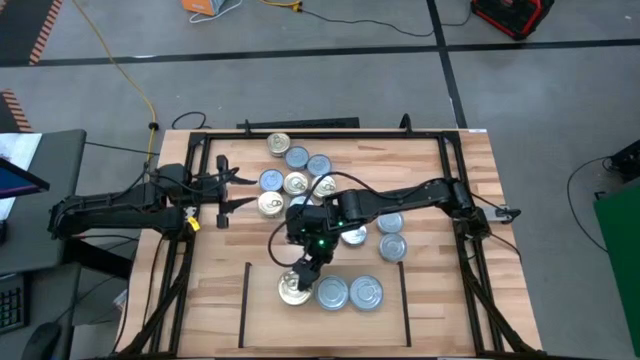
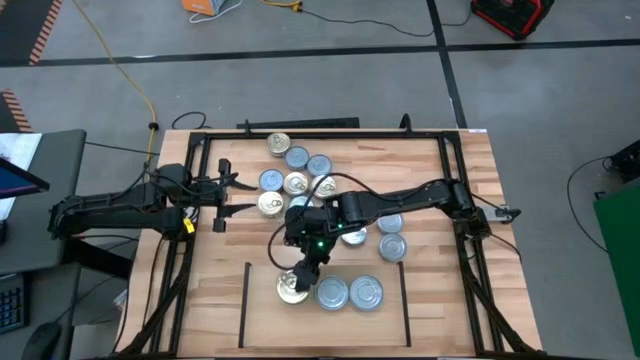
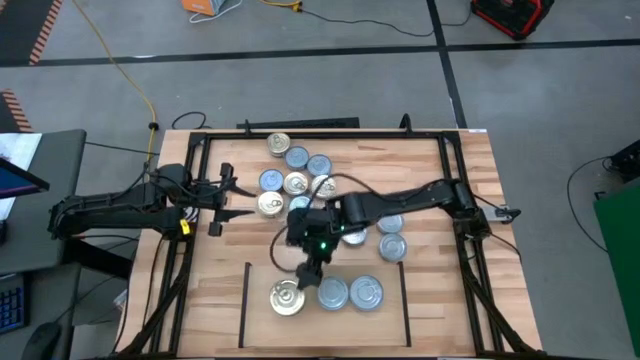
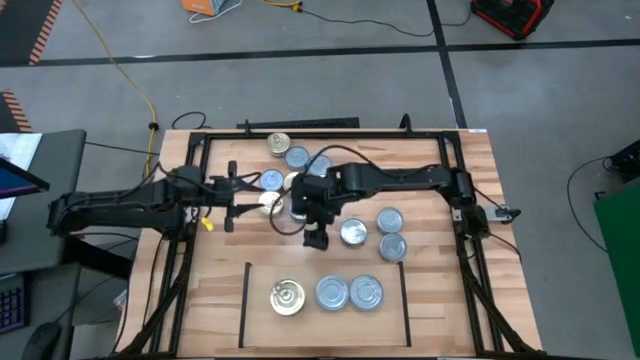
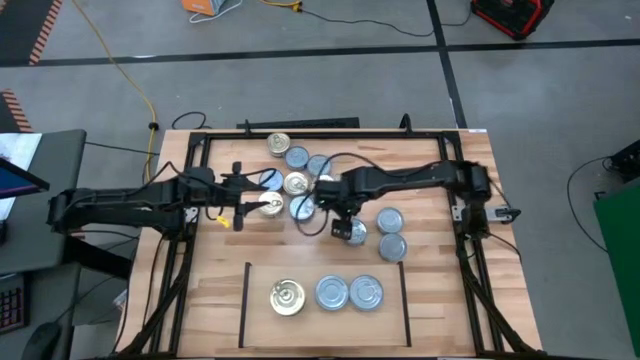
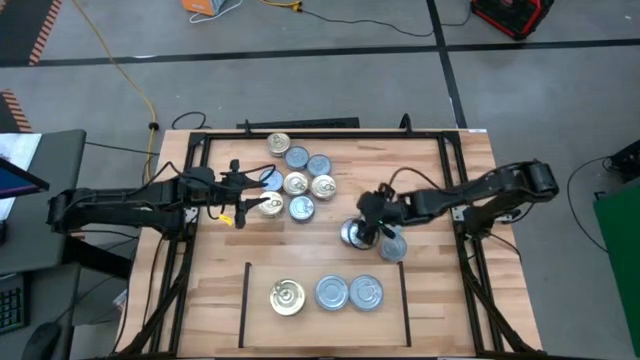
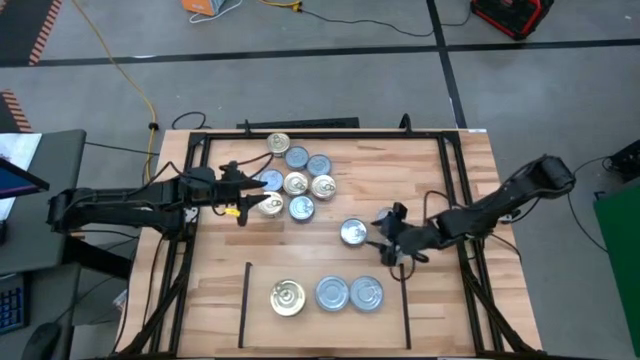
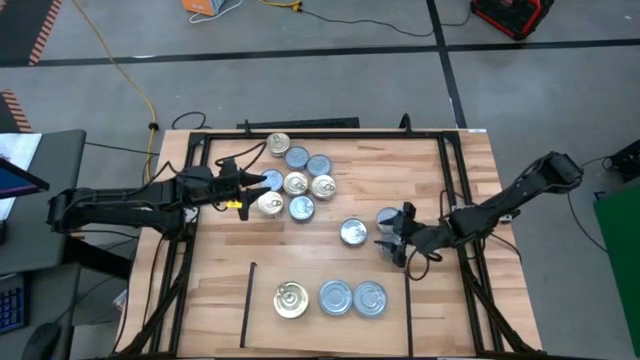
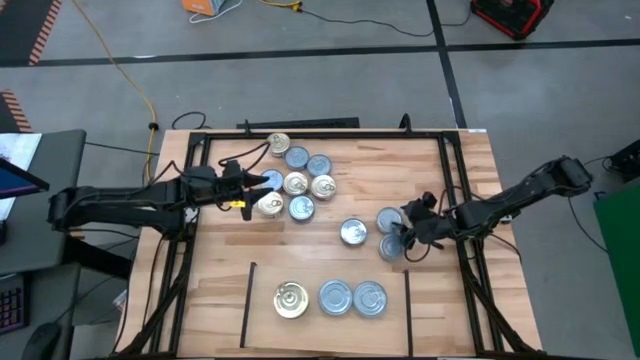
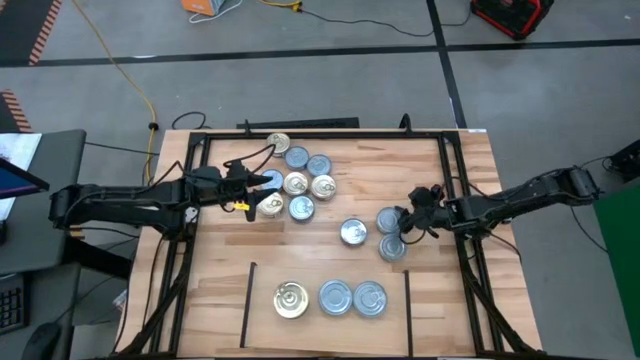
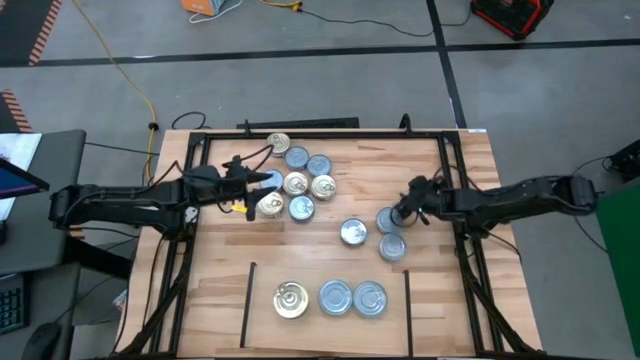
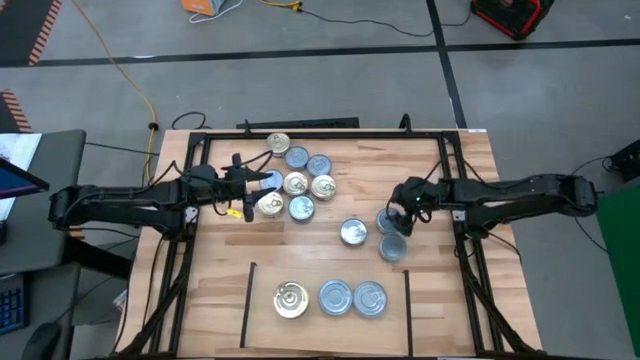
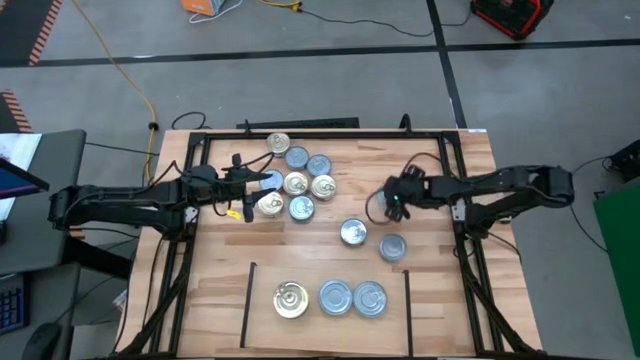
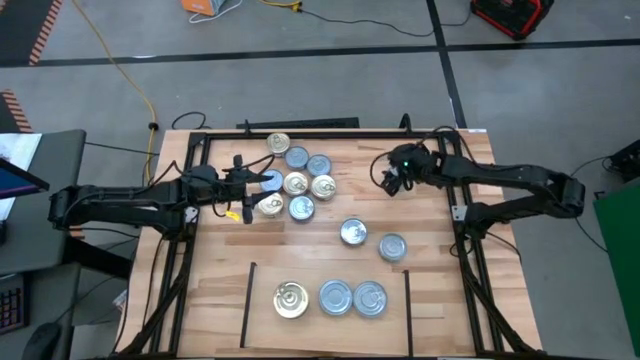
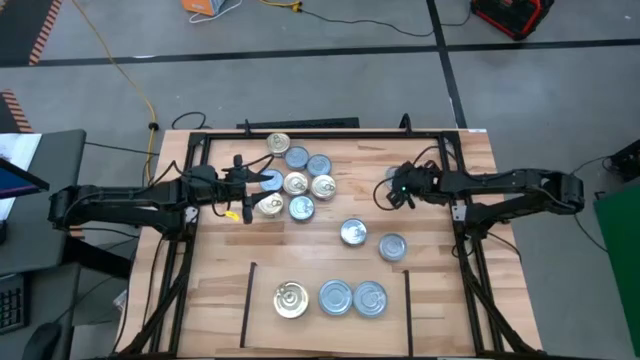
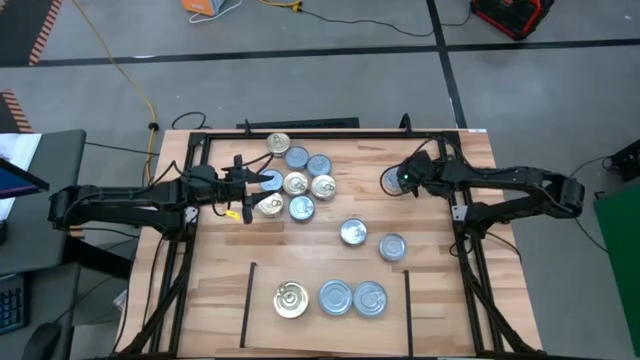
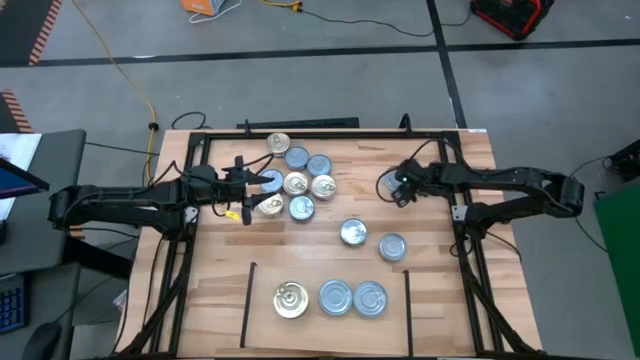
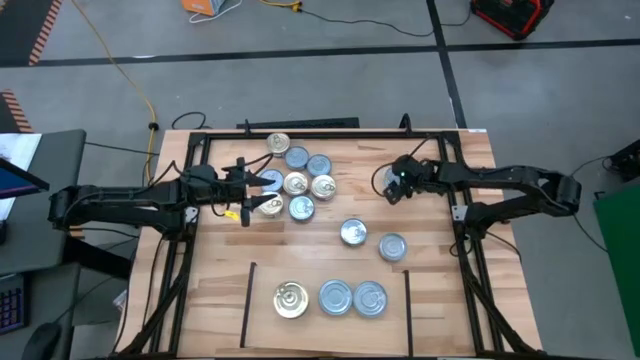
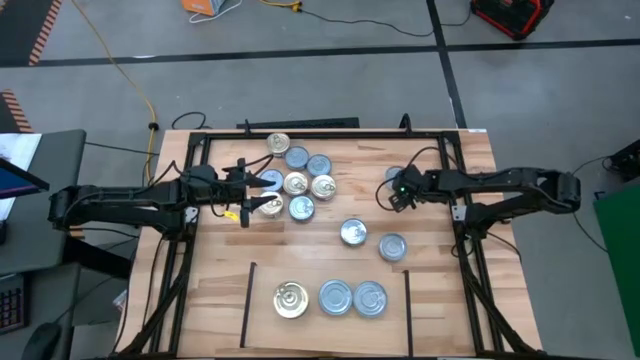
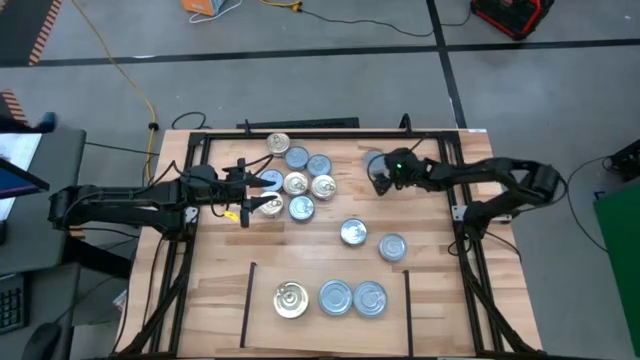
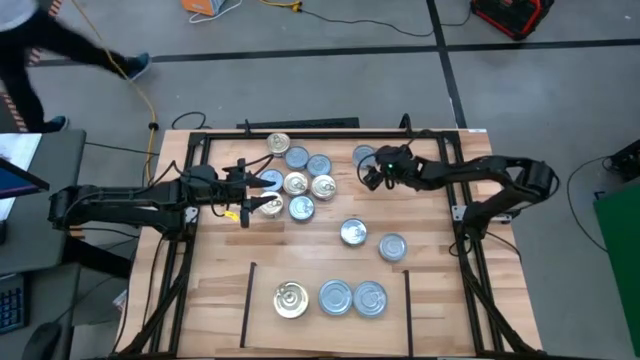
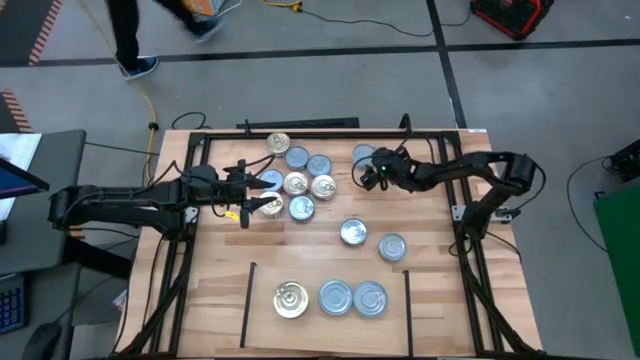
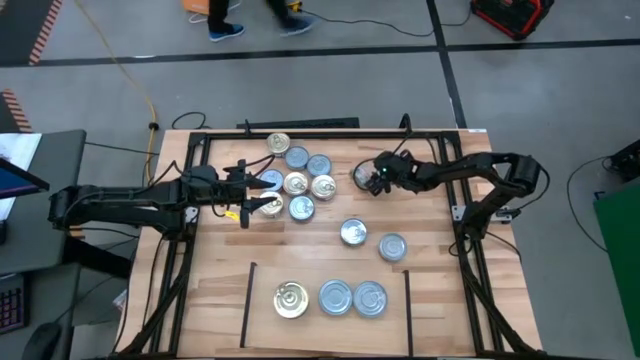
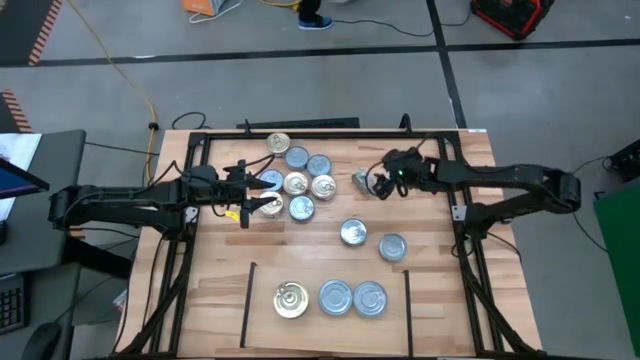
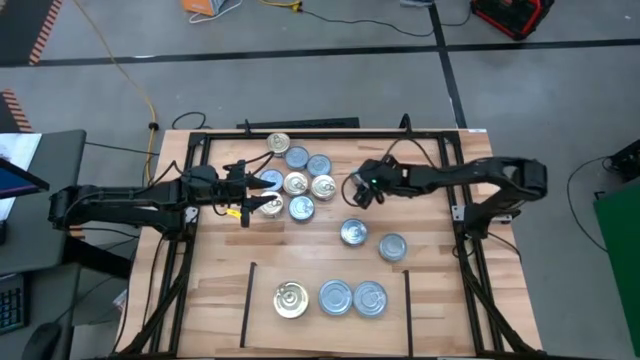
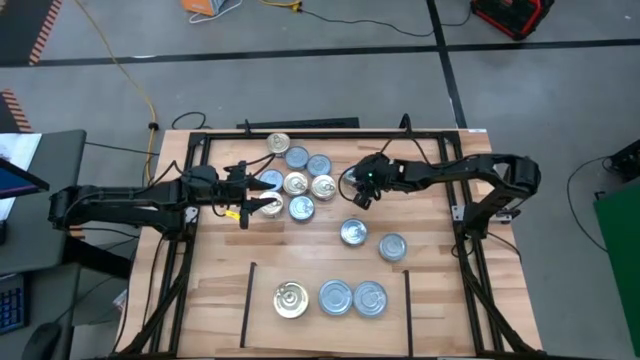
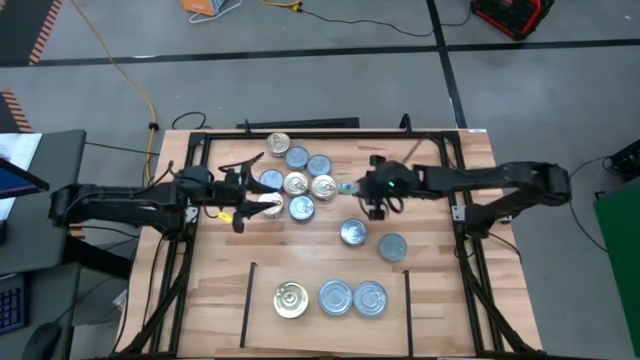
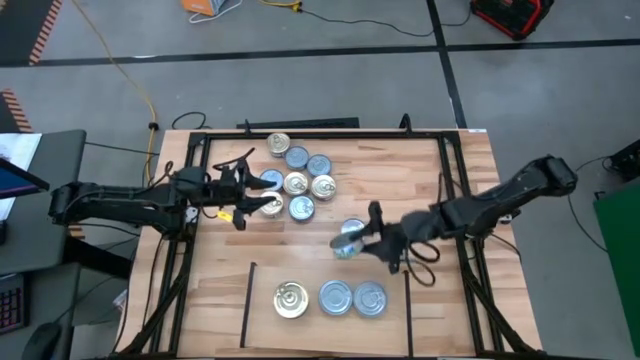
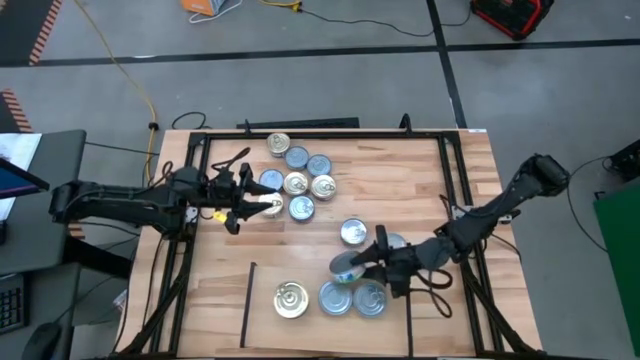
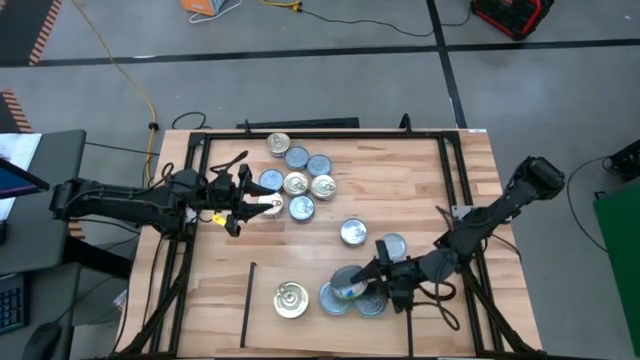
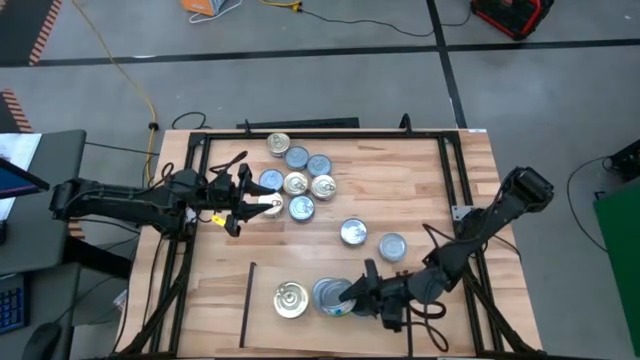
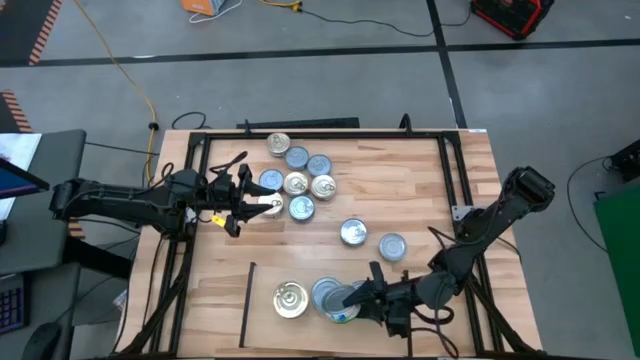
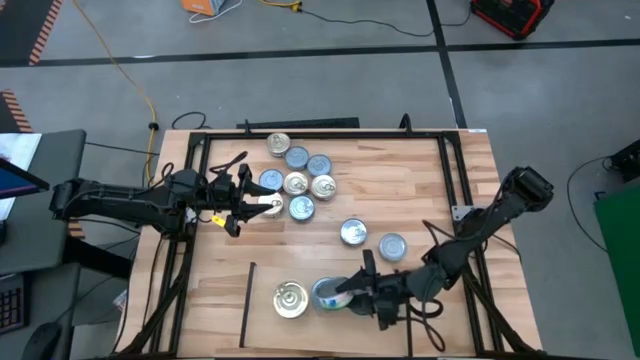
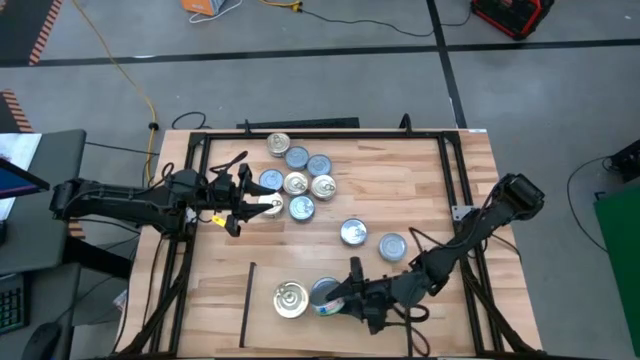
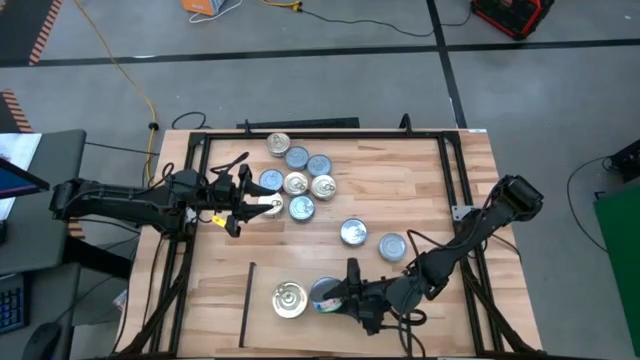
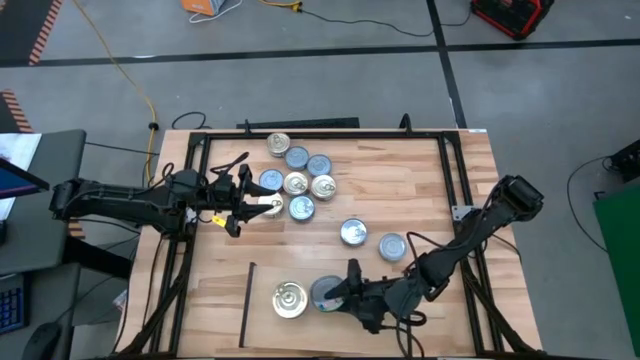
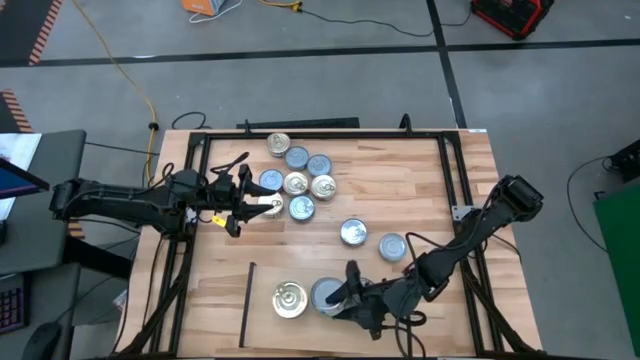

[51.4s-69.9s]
Task: Stack canned seafood by type on shelf
Put the top green and white tuna can on the top of the green and white tuna can on the shelf

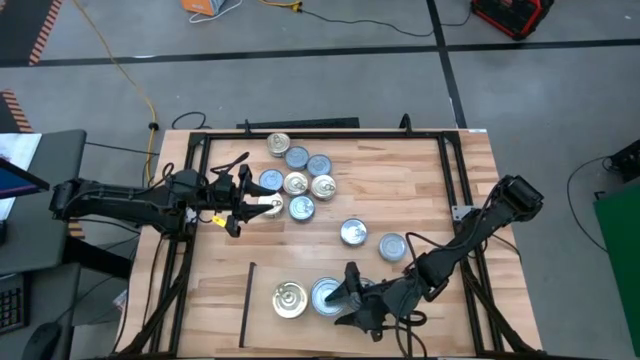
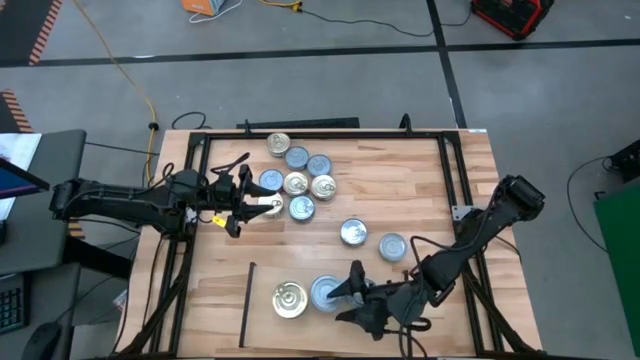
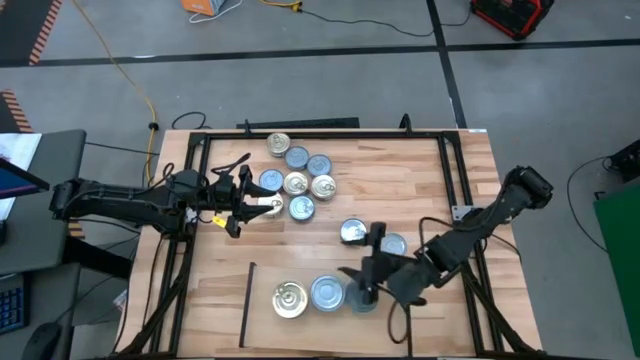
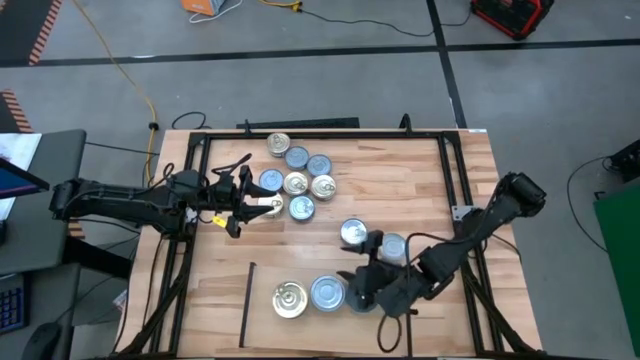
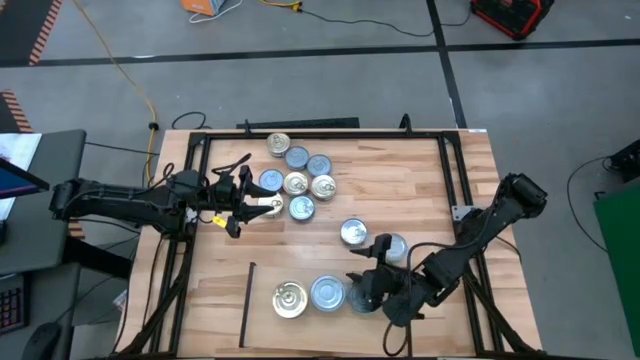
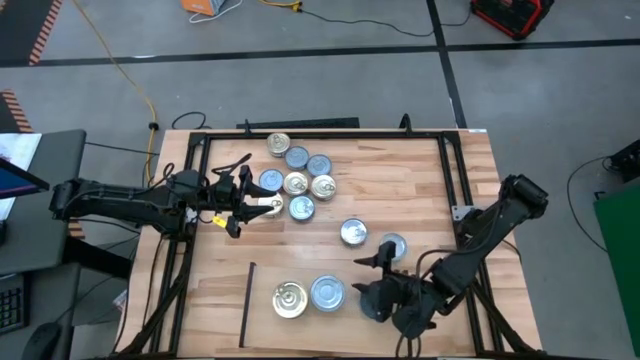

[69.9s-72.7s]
Adjust the yellow and blue tuna can on the shelf

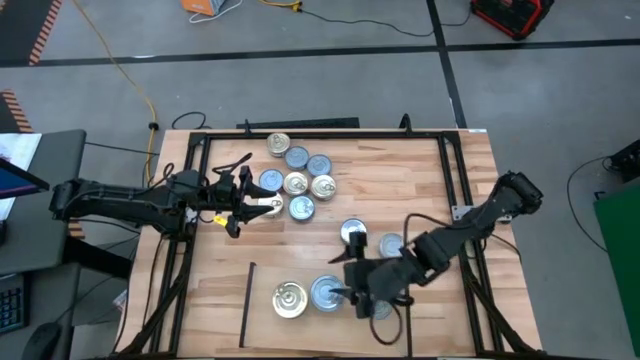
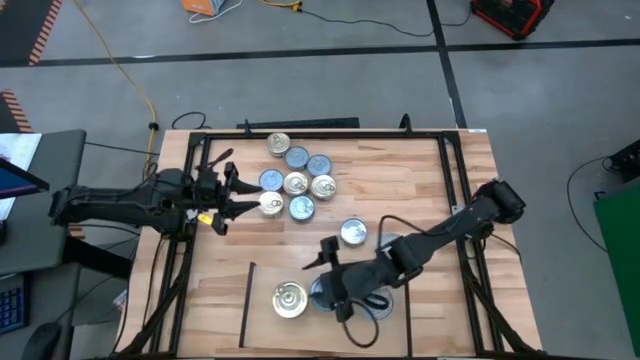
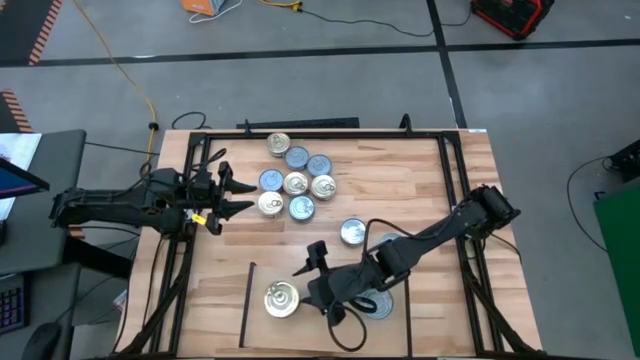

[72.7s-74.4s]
Adjust the left stacked tuna cans on the shelf
